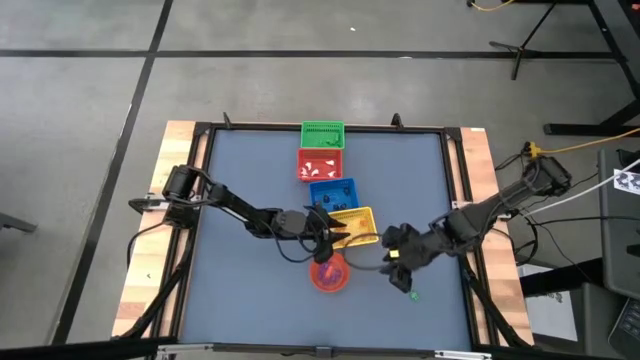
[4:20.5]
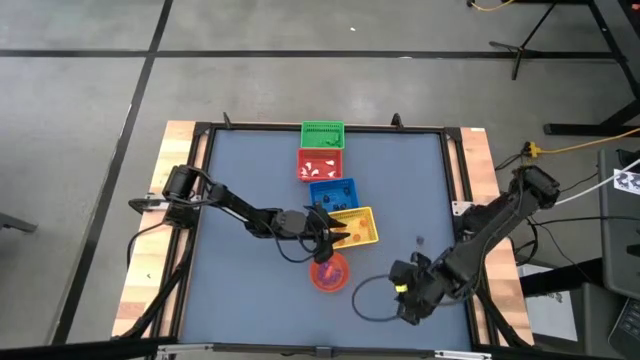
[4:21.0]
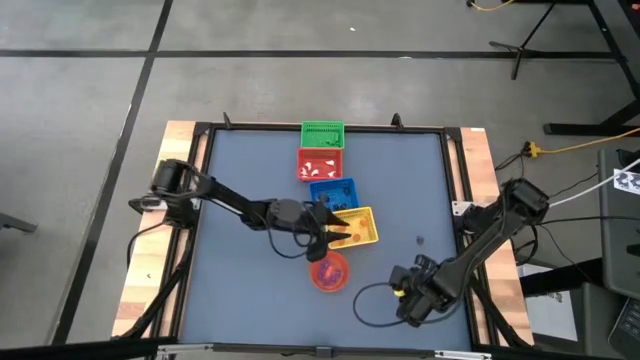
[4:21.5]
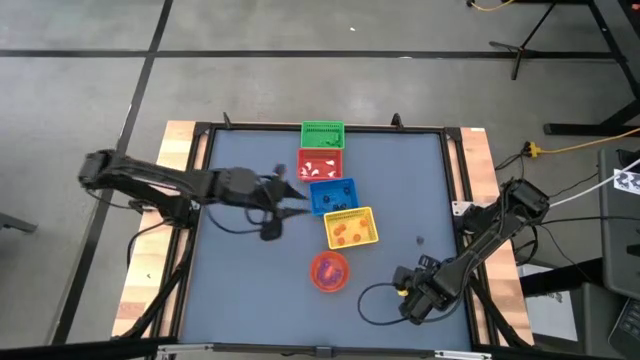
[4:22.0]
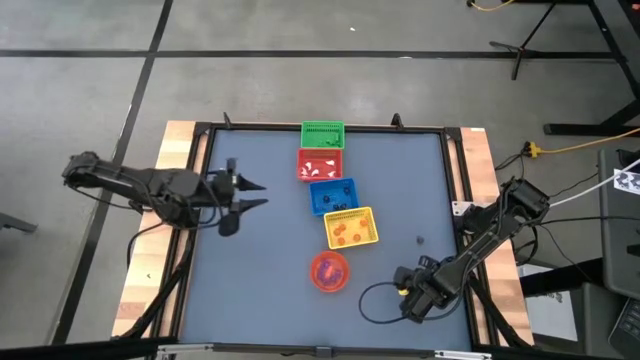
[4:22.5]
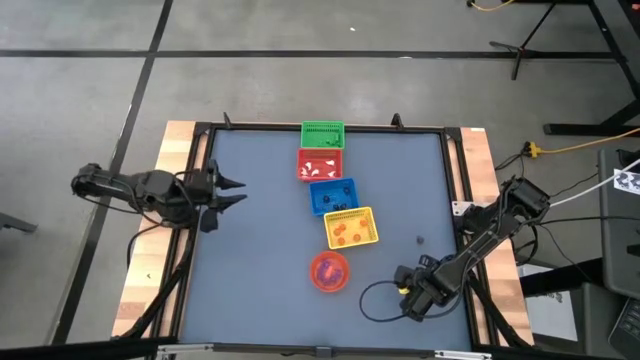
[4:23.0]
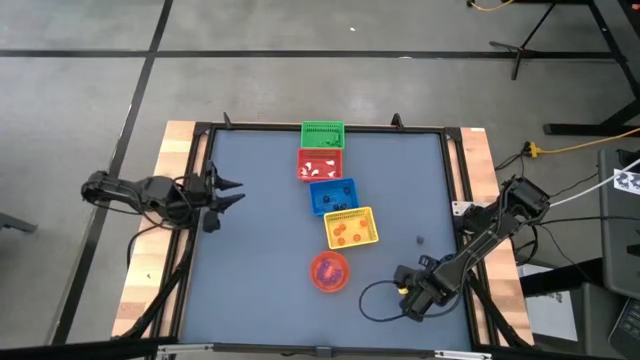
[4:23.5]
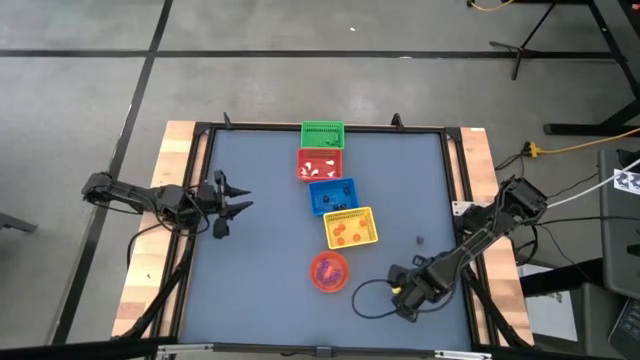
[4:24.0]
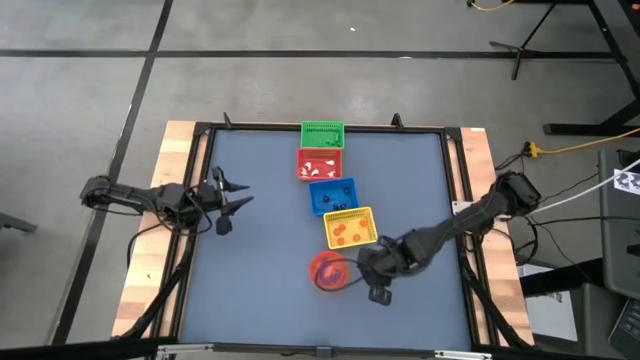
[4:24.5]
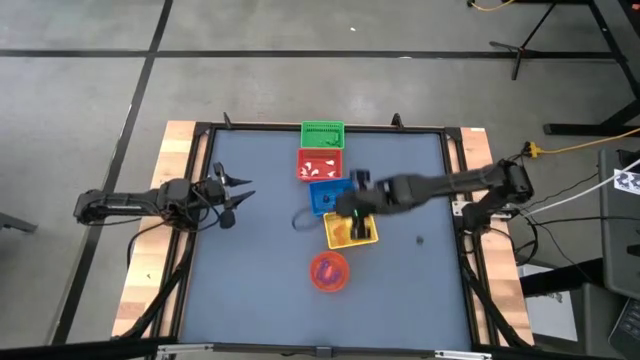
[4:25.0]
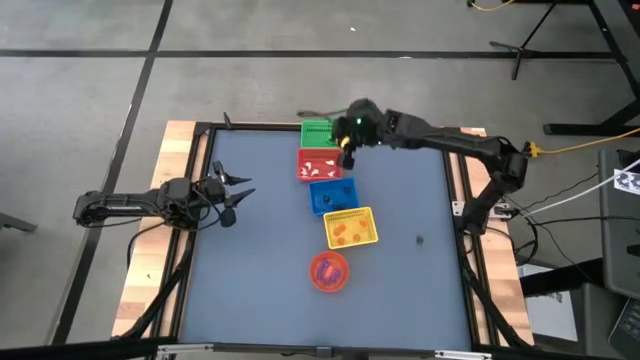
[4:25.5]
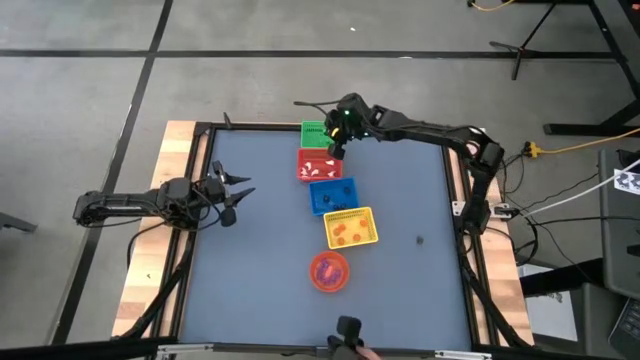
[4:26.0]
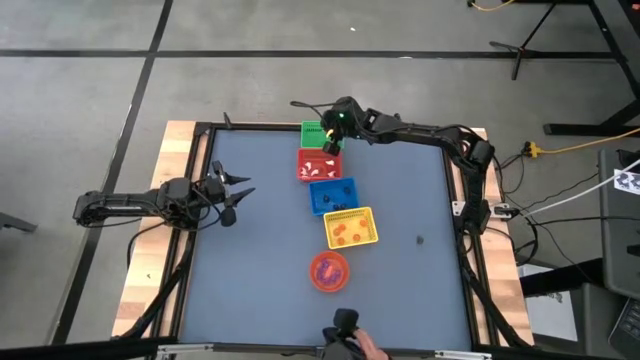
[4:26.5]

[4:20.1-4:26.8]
Task: Sort Halloween decoration
Put the green skeleton toy into the green bin

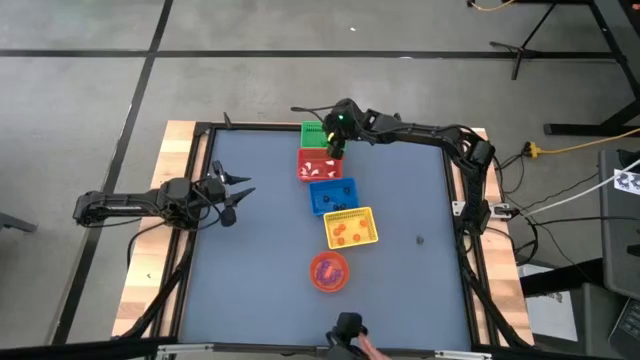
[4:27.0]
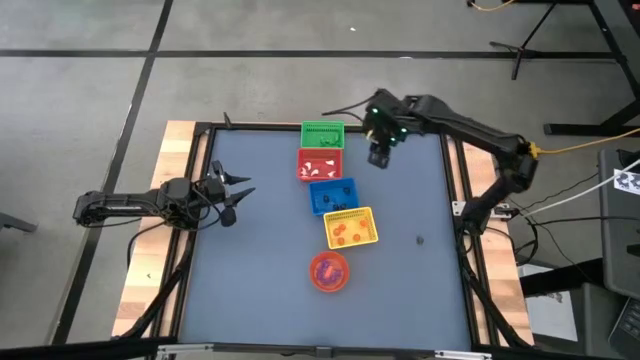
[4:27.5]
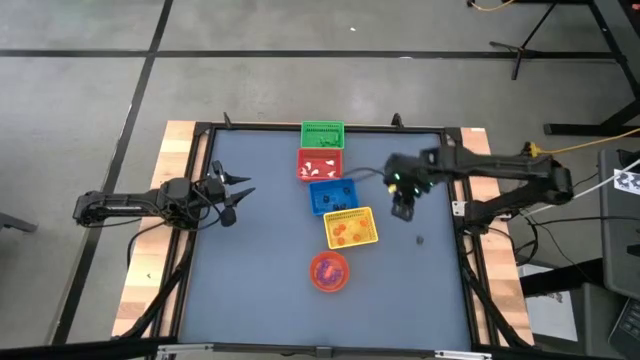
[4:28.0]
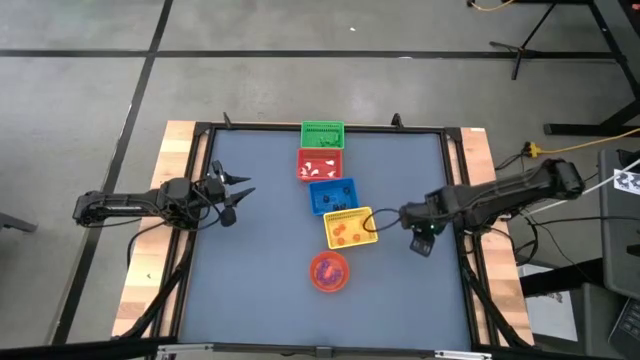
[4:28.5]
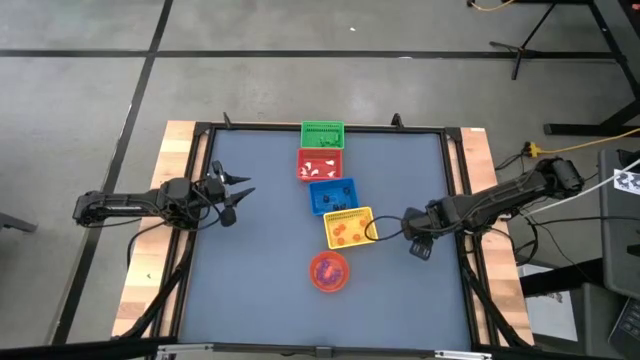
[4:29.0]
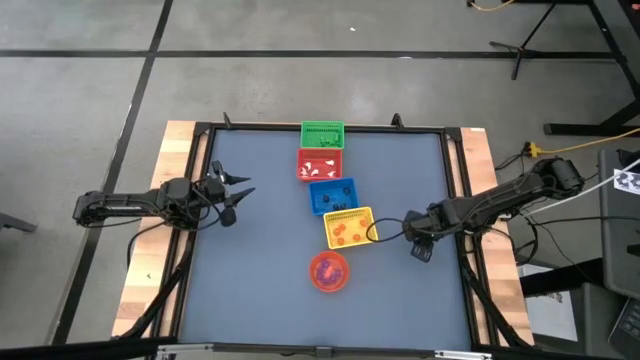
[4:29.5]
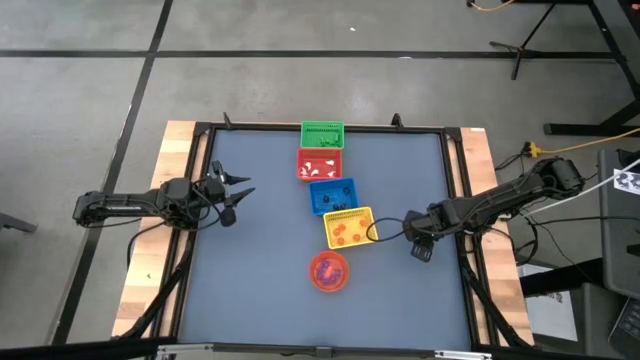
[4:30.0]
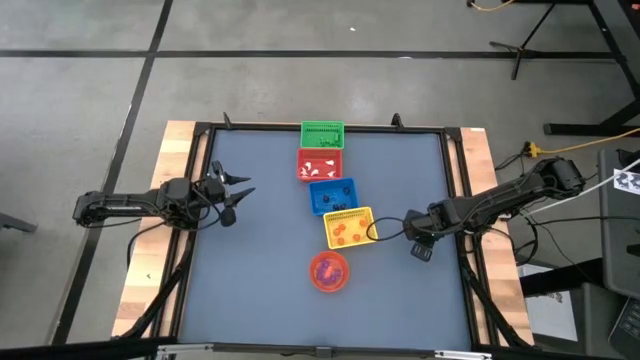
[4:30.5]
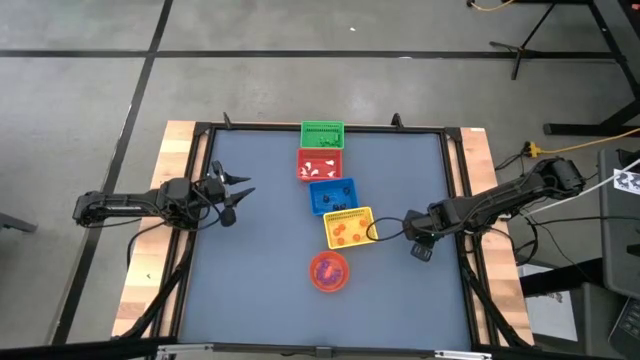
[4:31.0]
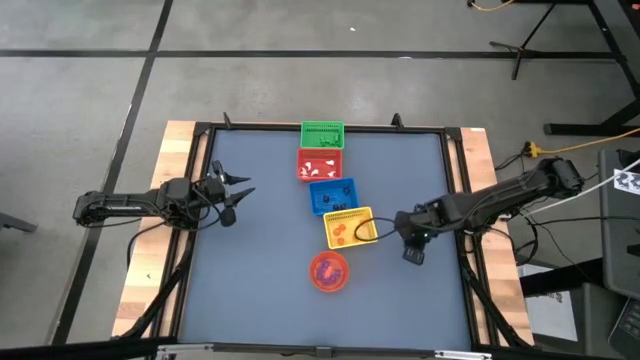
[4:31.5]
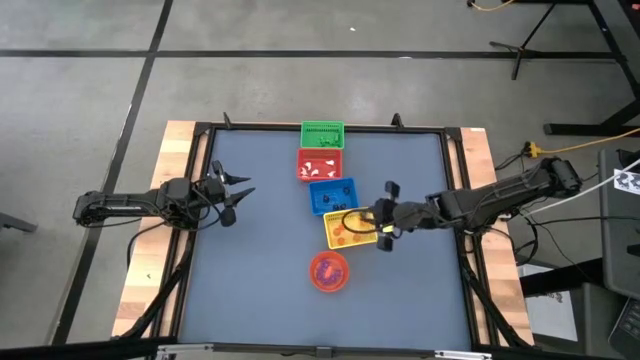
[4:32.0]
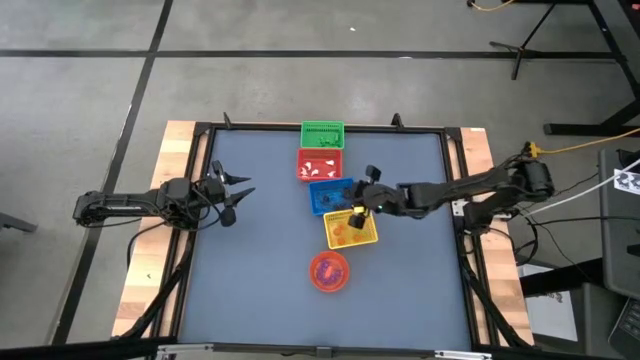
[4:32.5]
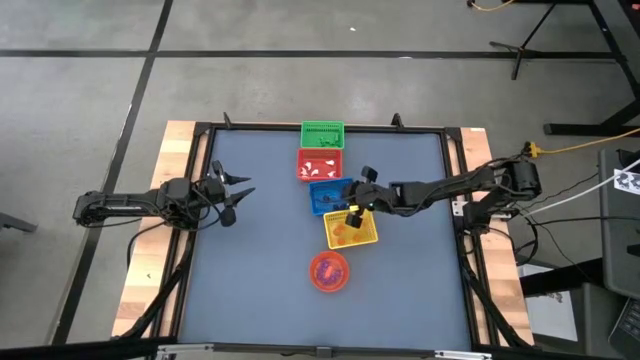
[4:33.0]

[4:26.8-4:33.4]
Put the black skull toy into the blue bin

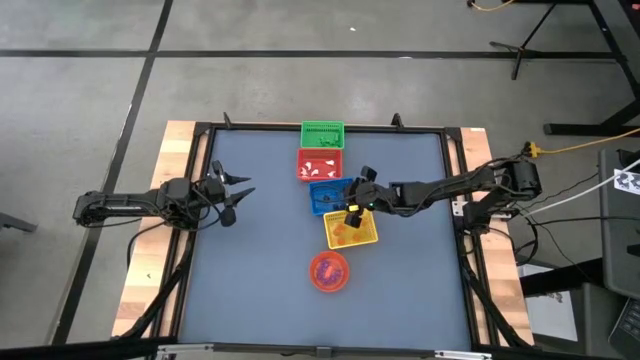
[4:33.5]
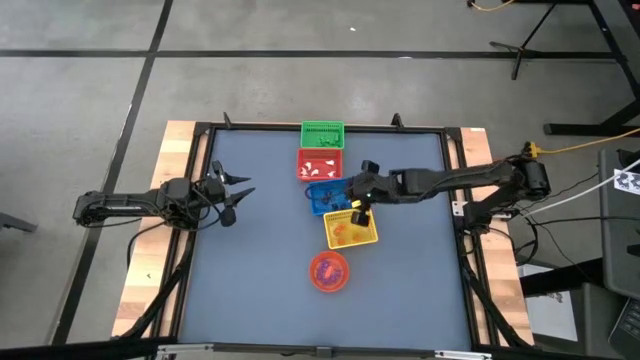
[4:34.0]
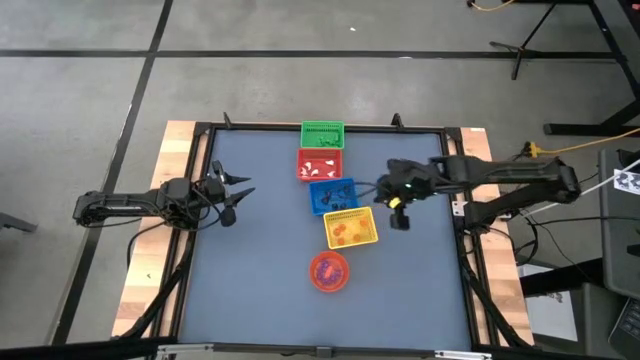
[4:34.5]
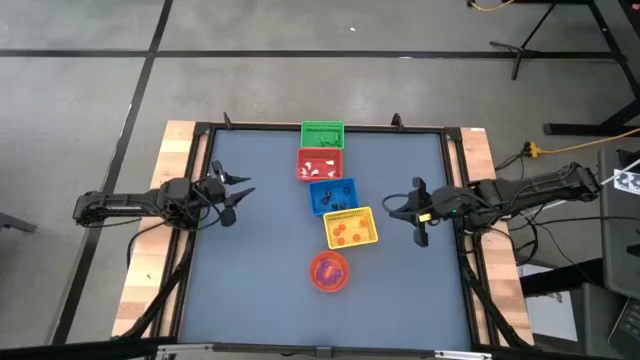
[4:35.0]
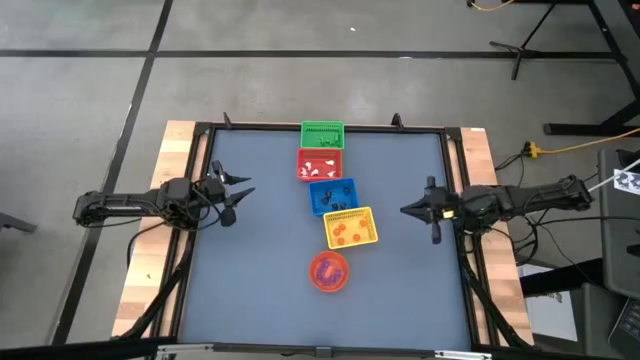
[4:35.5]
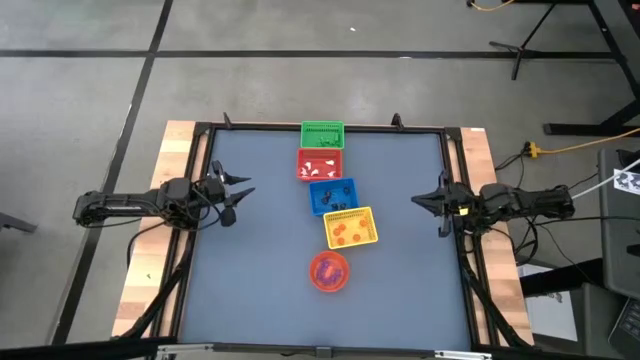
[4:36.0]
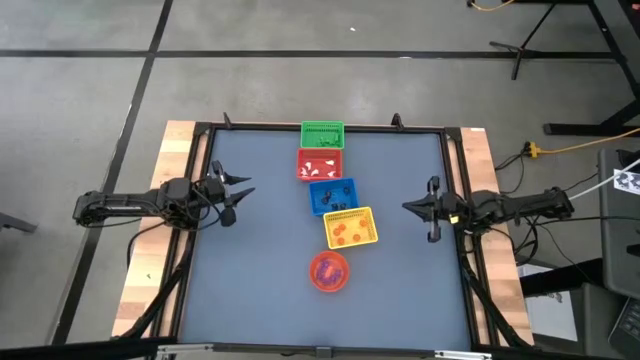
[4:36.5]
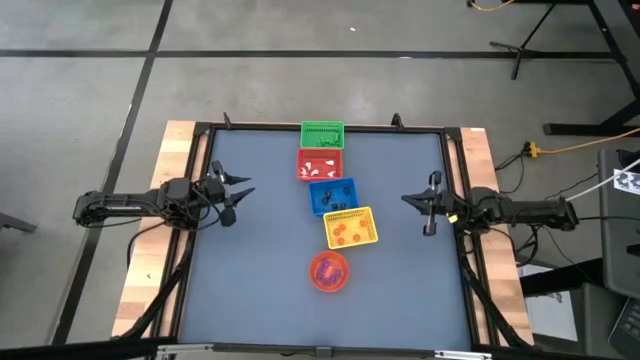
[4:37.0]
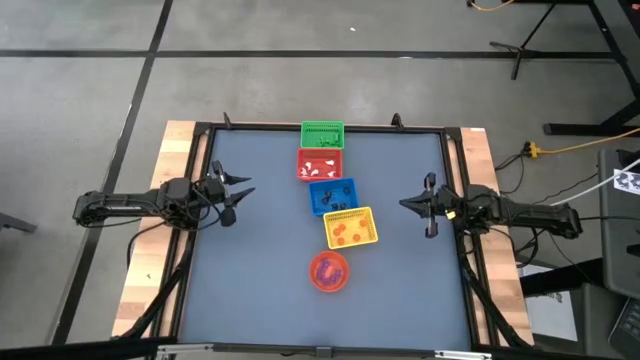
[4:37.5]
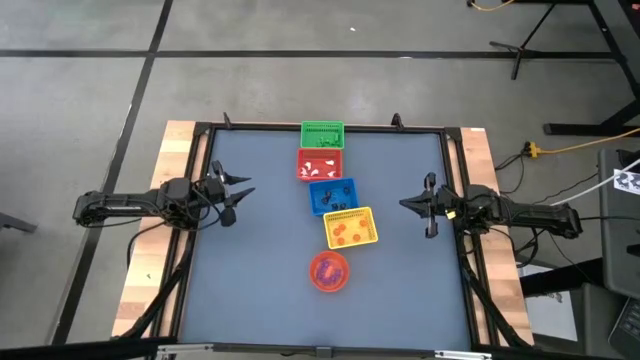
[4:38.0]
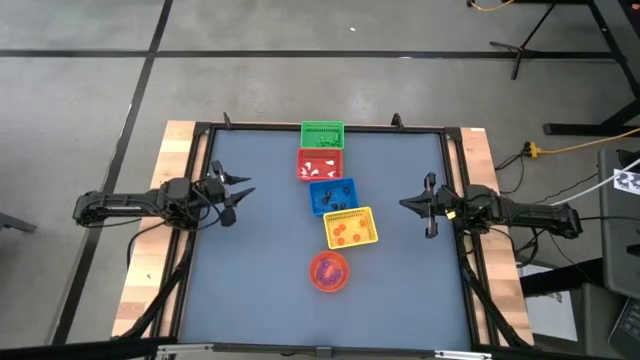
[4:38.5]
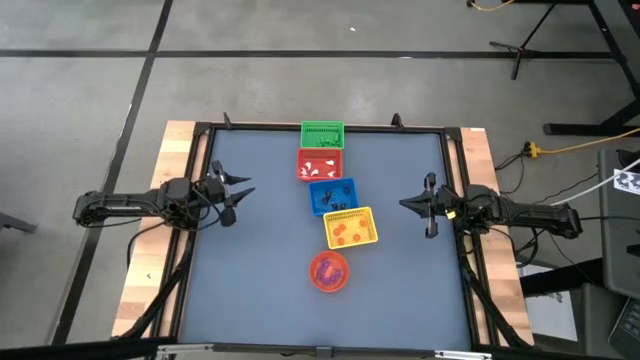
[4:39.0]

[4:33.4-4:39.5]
Return to Home Position

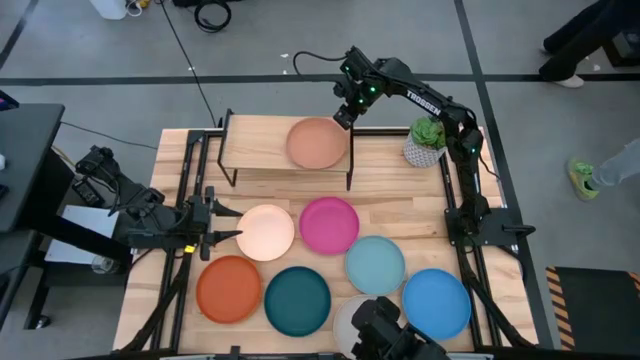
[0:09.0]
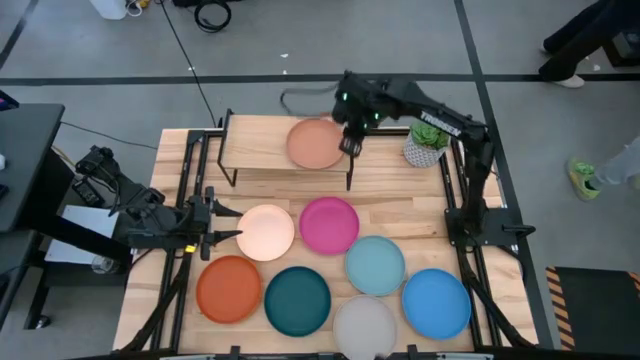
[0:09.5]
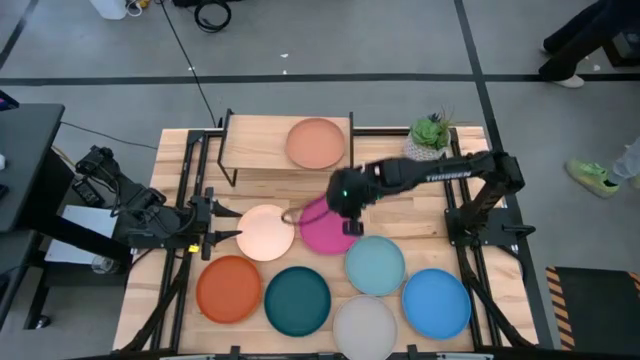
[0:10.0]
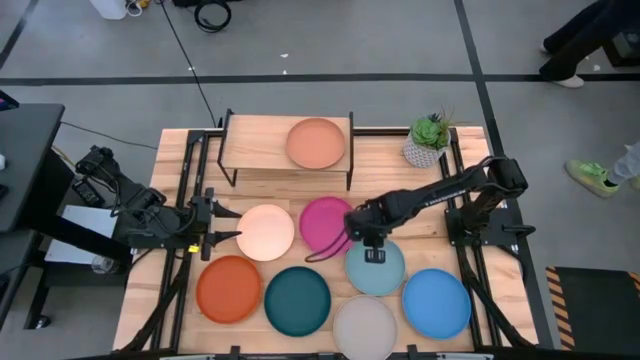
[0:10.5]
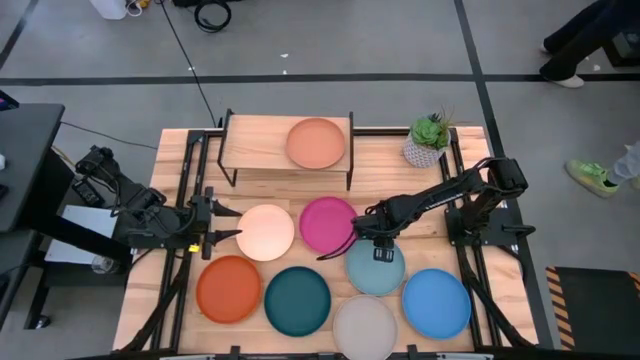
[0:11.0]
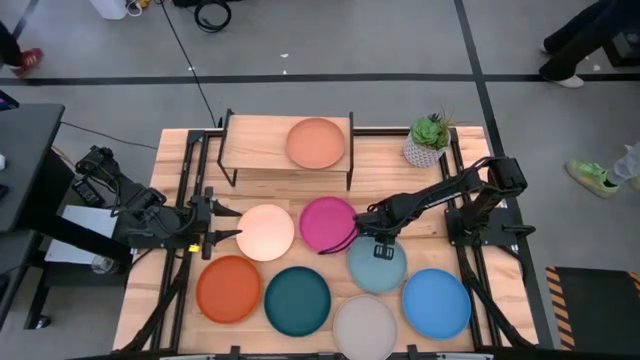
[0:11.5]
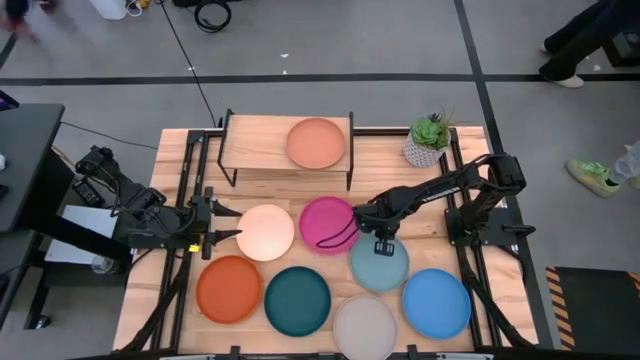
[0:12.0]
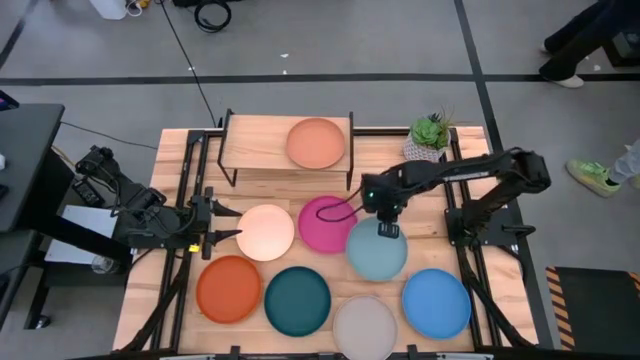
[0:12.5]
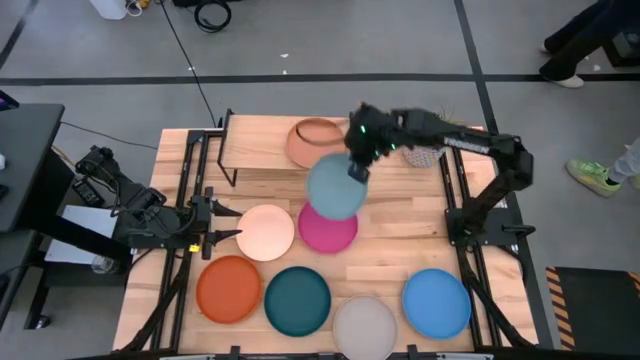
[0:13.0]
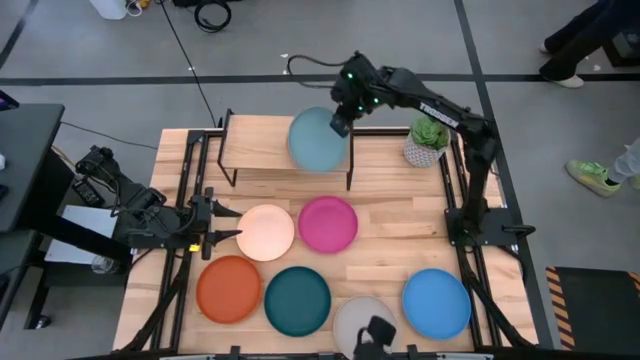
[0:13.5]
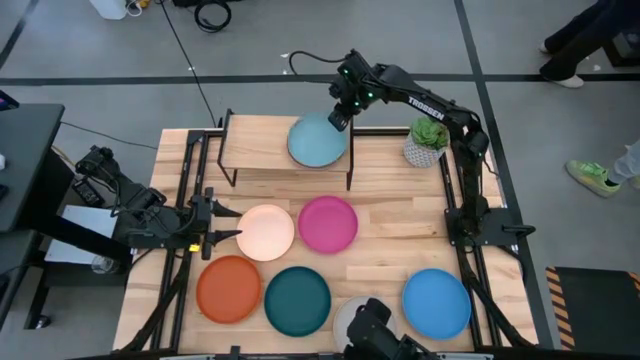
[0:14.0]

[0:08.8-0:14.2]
Task: Place and stack plates onto a shelf
Stack the light blue plate on top of the brown plate on the shelf
